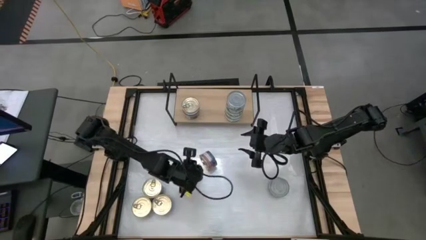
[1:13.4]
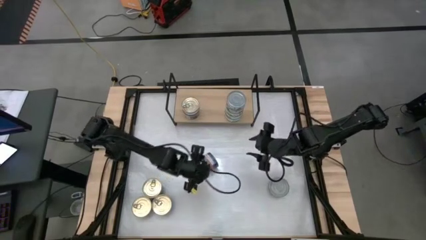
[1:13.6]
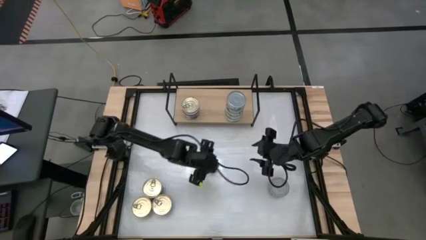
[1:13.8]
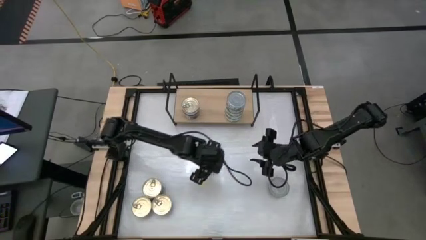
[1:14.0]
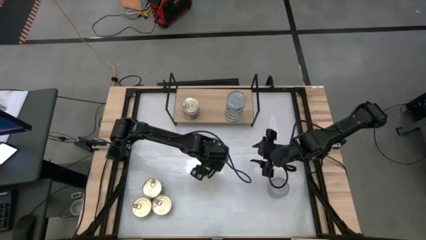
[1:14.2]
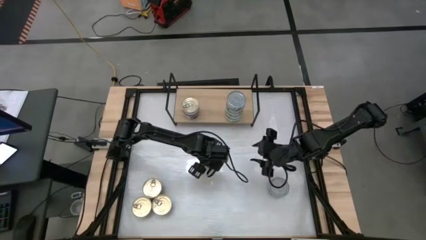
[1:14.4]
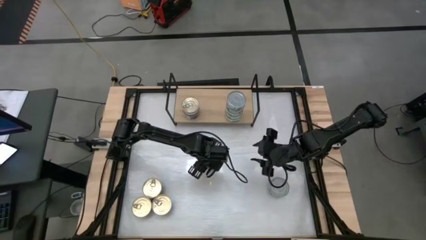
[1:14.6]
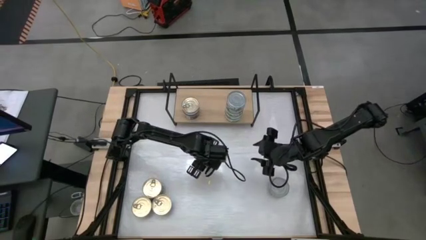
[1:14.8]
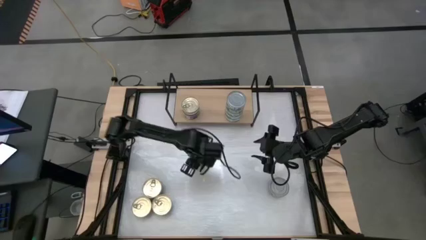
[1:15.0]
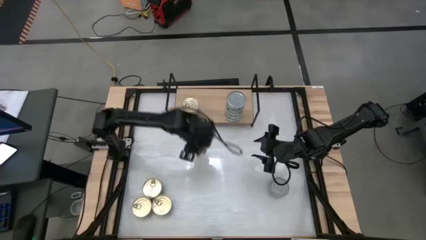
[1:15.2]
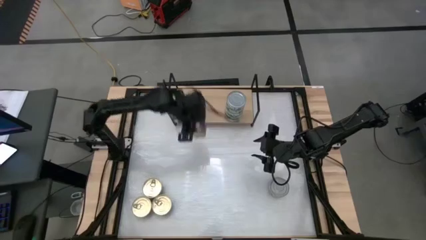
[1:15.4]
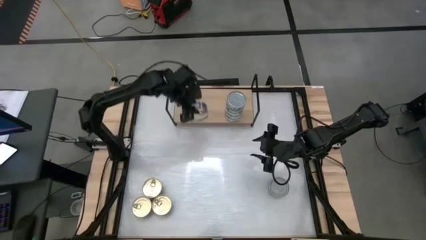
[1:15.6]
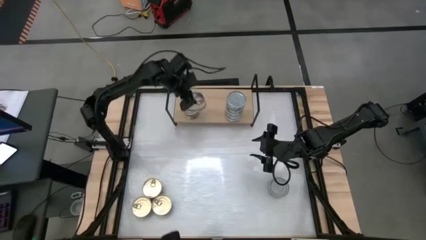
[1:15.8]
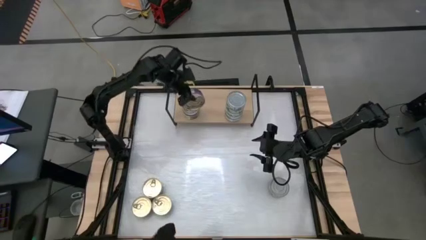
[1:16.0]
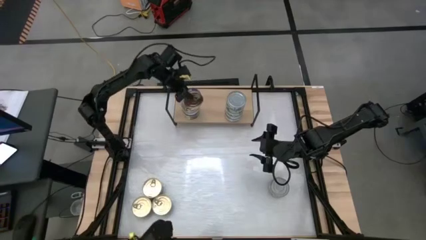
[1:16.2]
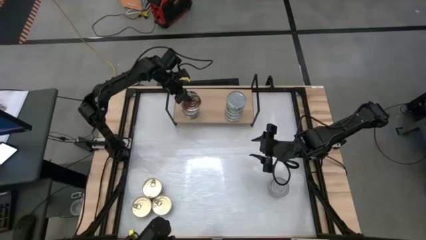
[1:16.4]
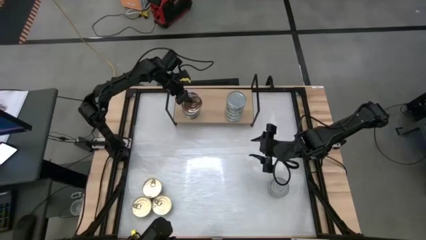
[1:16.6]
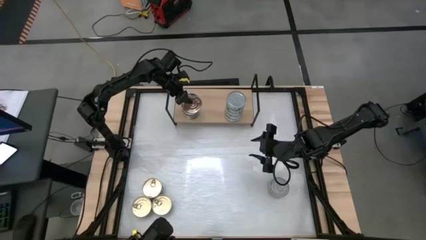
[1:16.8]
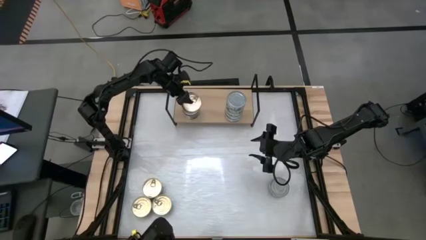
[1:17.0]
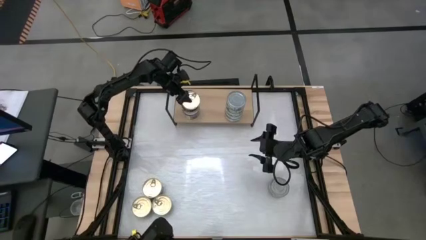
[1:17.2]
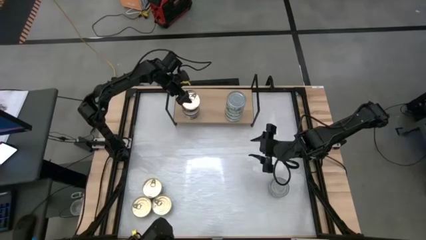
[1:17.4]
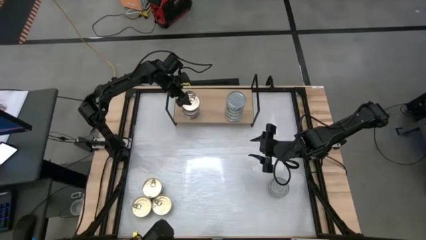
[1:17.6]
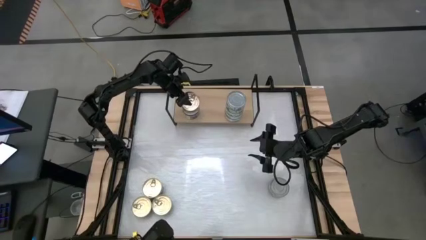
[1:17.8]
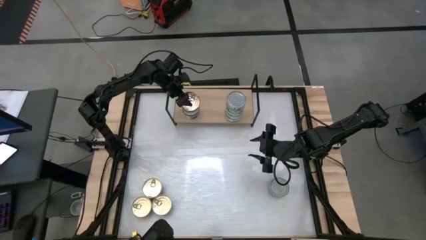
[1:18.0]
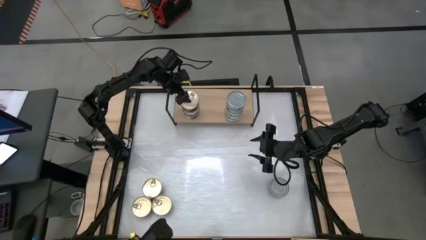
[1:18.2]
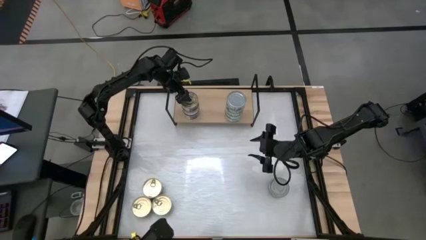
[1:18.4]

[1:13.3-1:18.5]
Task: Stack canned seafood by type on shelf
Stack the blue pink tuna can on top of the blue pink tuna can on the shelf

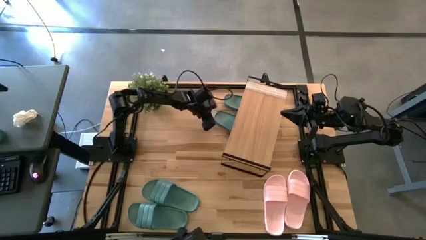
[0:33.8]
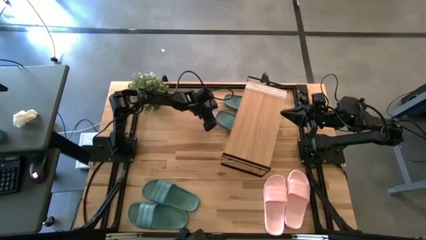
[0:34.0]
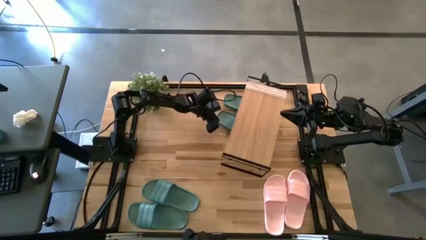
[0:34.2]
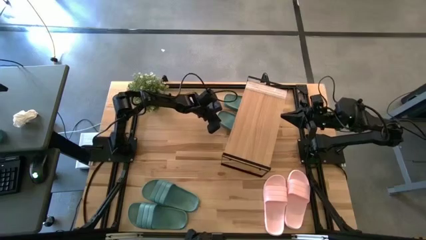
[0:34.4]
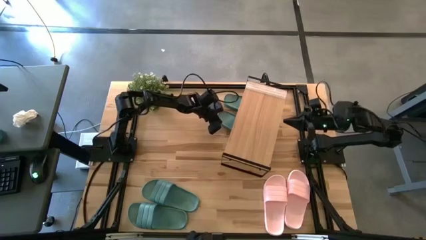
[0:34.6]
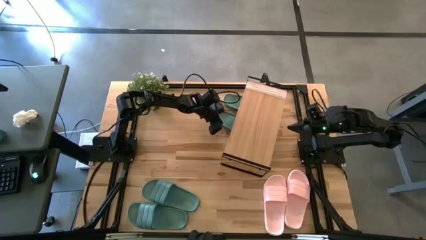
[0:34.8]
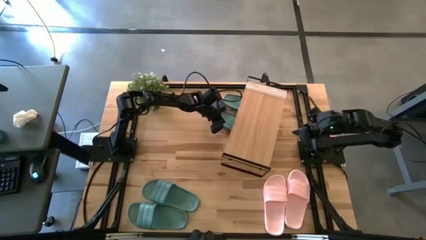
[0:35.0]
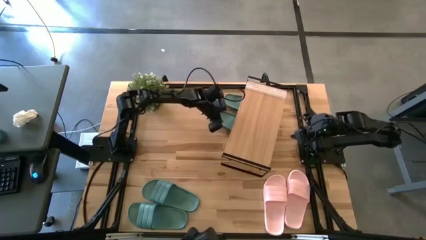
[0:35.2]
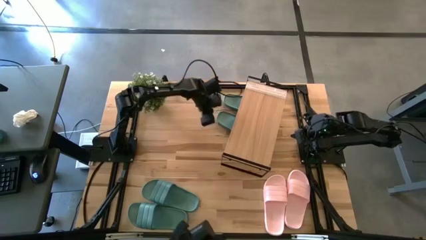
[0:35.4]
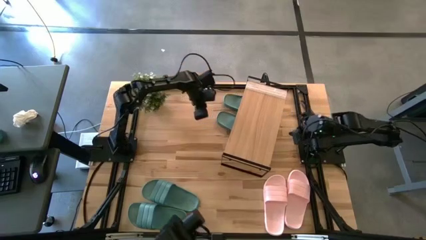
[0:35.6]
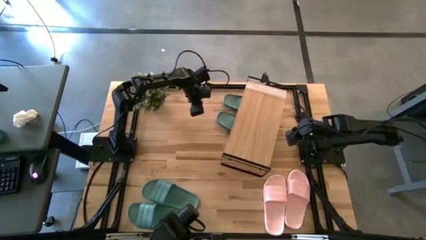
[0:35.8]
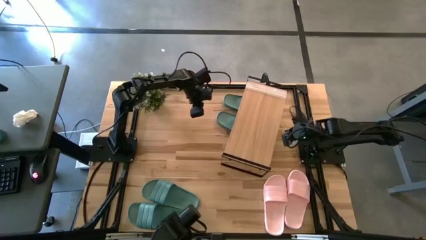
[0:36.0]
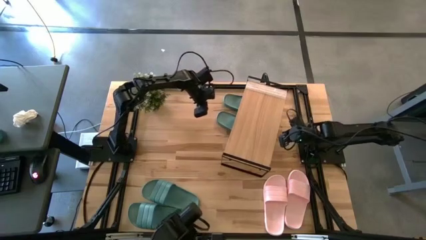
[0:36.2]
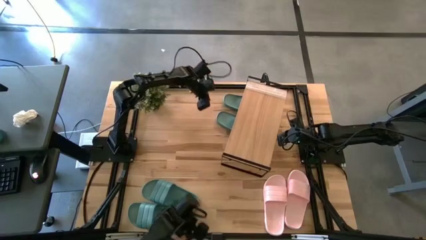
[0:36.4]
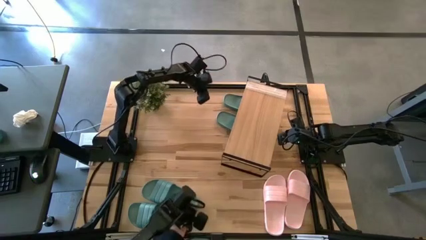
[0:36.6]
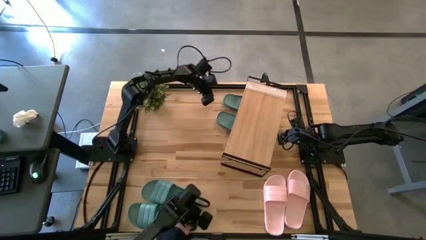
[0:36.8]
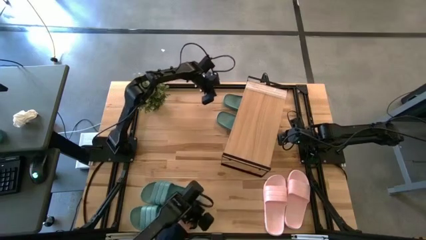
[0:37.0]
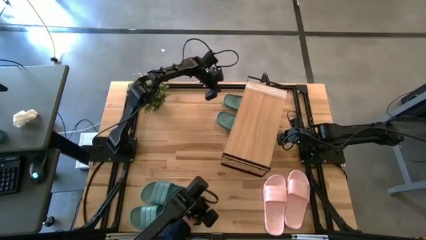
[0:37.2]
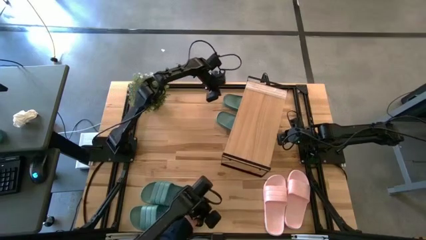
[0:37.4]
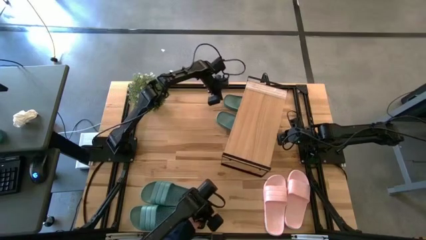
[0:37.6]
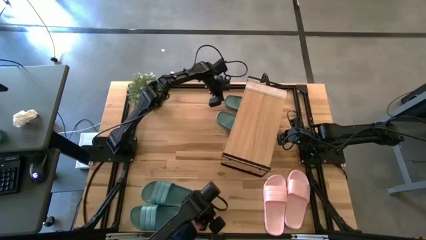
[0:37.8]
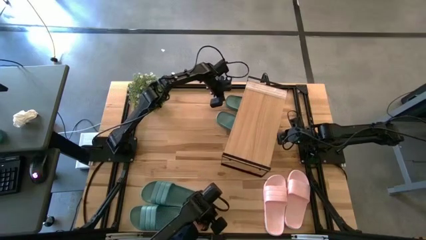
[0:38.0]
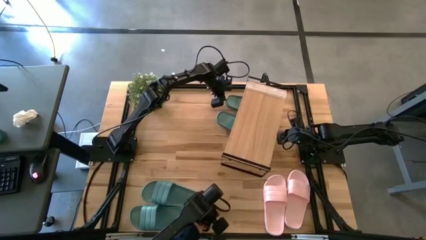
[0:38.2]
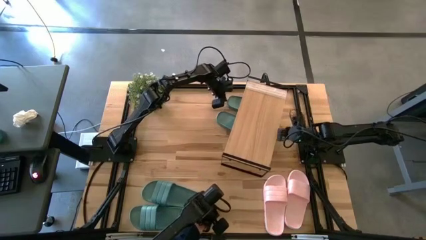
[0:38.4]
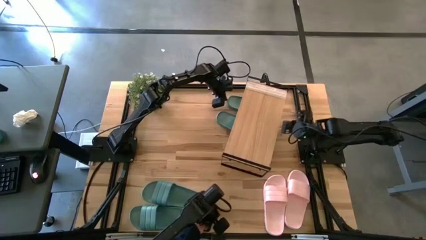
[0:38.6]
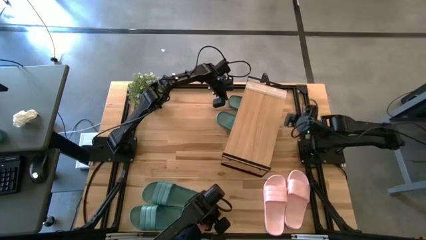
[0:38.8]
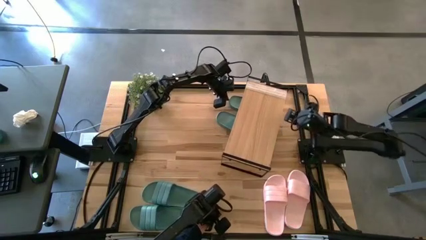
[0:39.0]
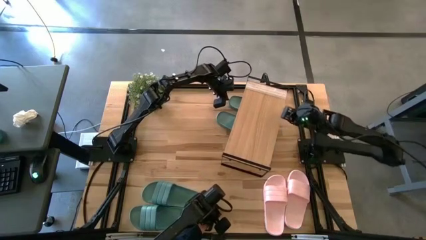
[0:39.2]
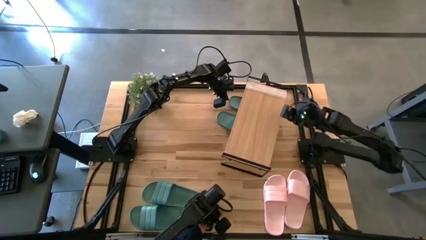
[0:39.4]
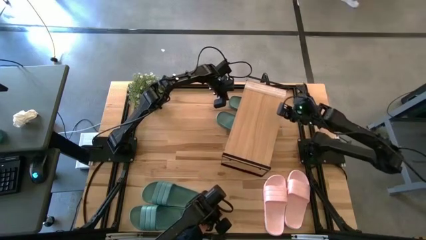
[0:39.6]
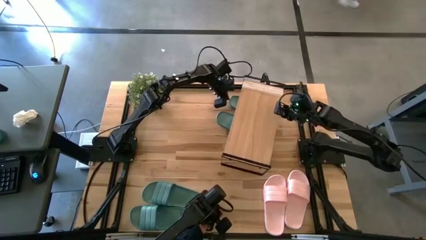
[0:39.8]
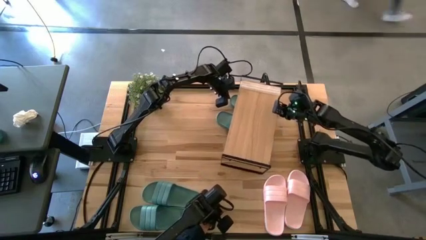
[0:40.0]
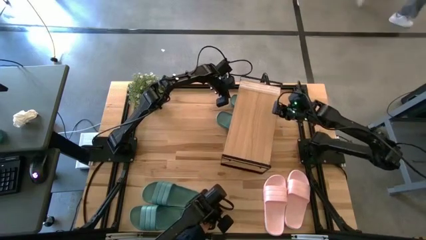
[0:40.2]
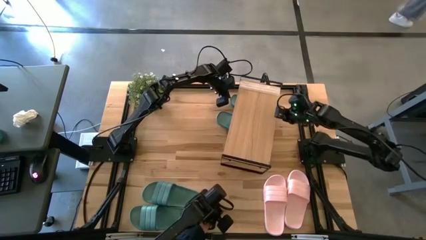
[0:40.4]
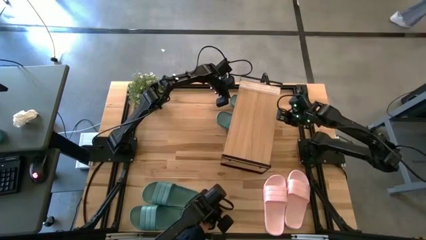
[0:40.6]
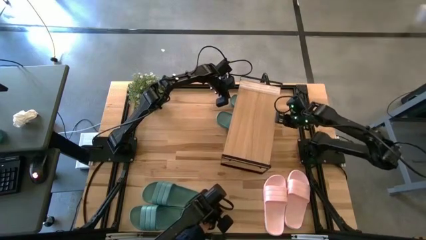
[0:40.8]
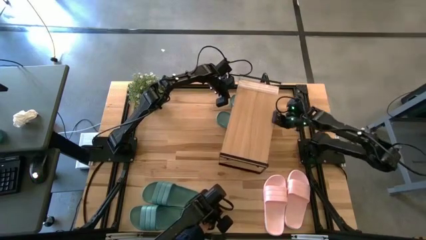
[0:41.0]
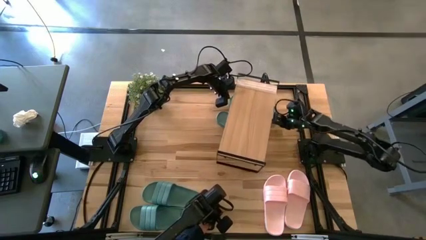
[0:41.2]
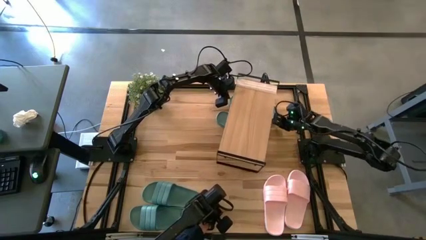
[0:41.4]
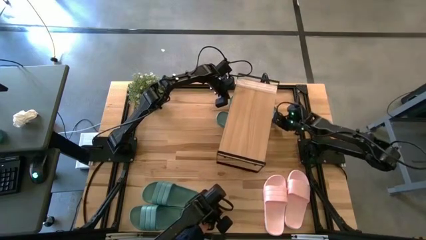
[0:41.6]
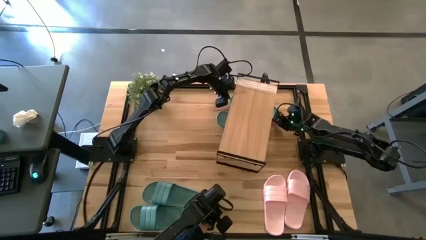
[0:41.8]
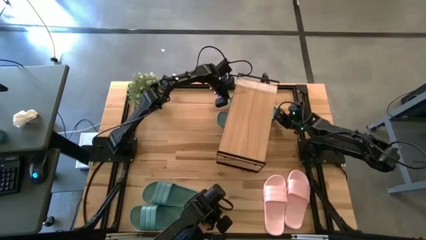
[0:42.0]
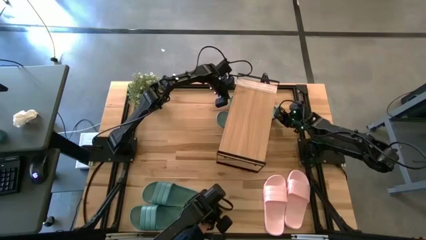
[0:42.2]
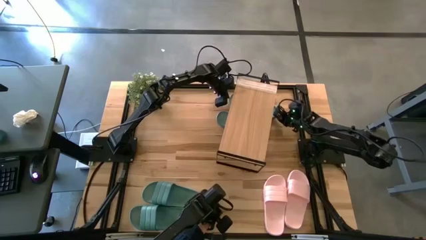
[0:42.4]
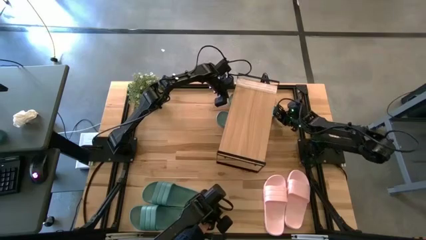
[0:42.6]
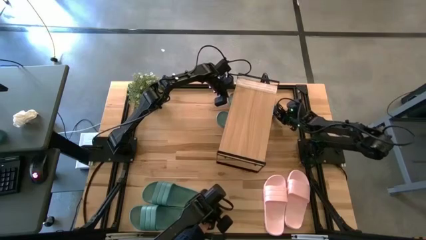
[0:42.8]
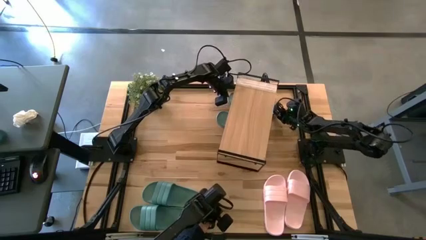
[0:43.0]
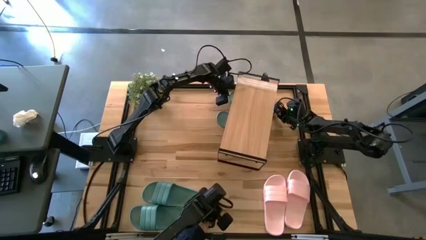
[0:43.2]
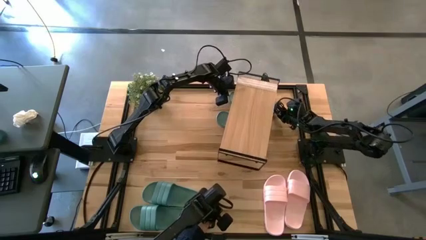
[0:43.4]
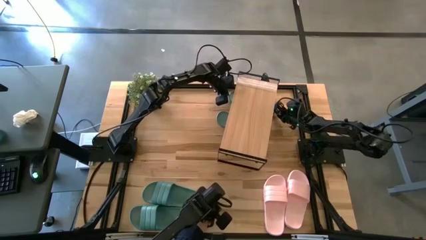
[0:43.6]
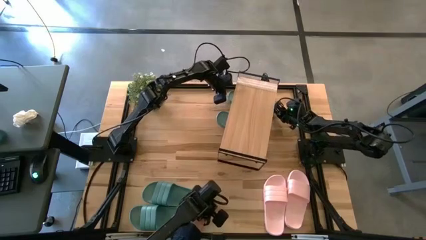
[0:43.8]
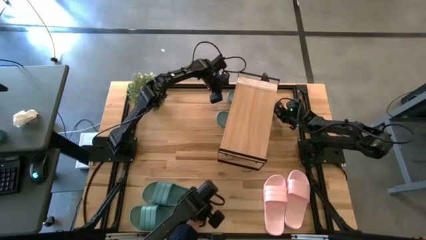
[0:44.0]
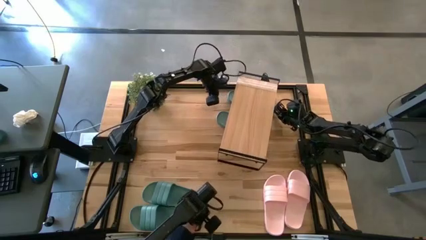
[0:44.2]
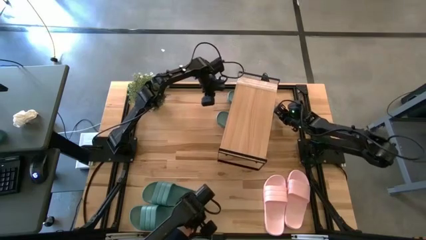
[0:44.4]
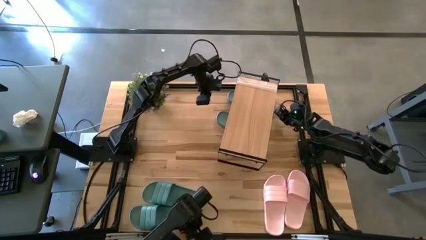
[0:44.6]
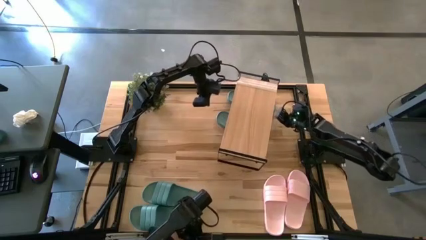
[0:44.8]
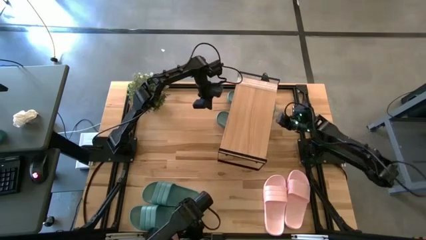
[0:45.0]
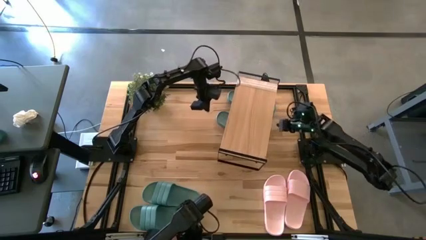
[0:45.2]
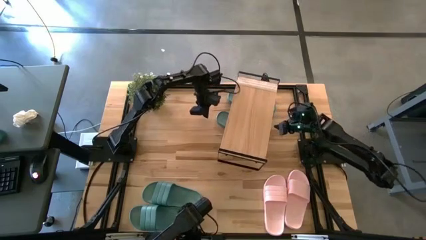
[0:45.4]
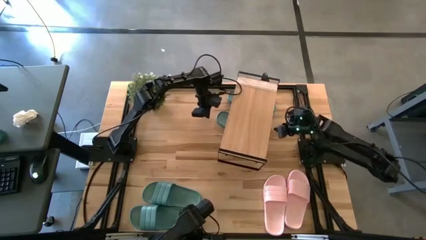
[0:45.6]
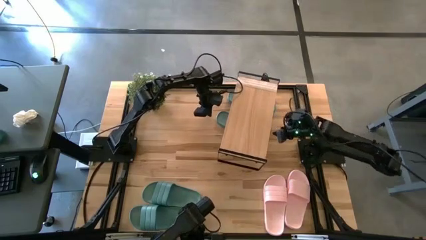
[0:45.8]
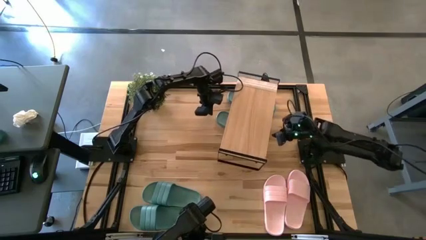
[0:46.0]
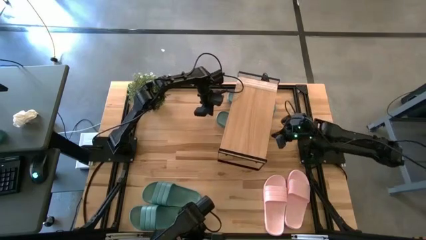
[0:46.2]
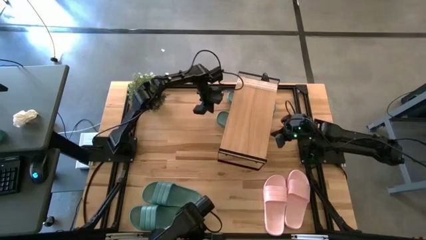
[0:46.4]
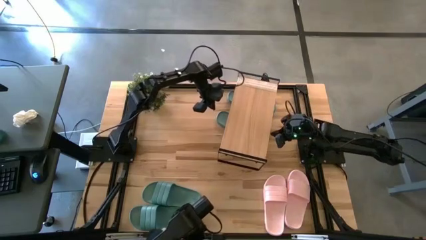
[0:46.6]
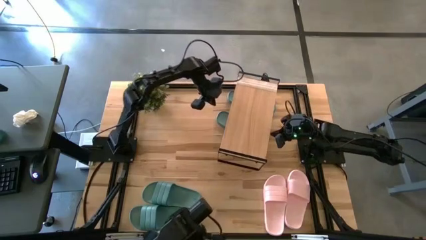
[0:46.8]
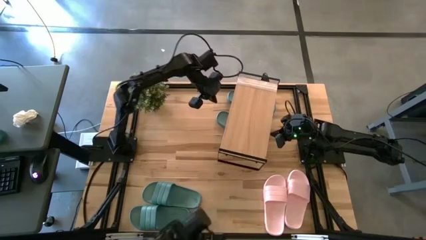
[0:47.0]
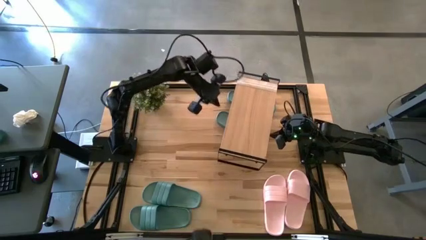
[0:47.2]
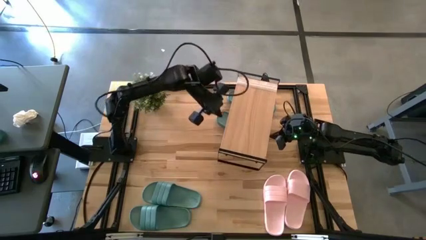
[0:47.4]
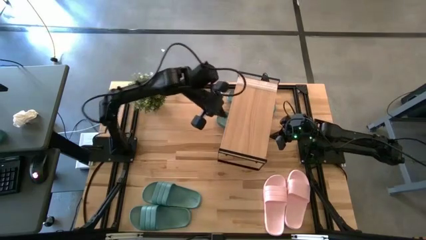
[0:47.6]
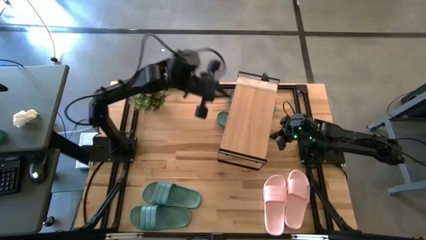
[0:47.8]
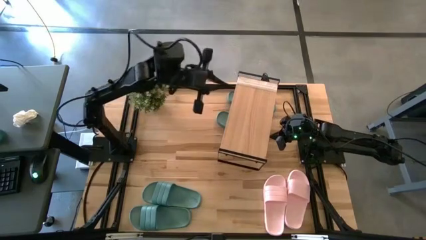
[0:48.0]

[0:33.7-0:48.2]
Task: Pick and place slides into the shelf
Adjust the green slides under the shelf
